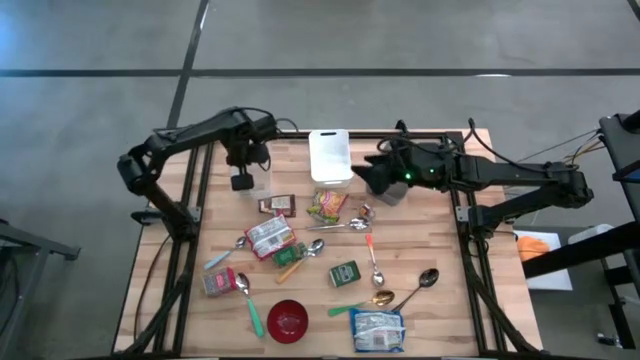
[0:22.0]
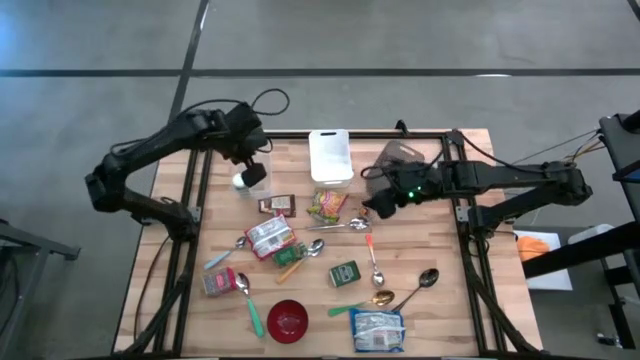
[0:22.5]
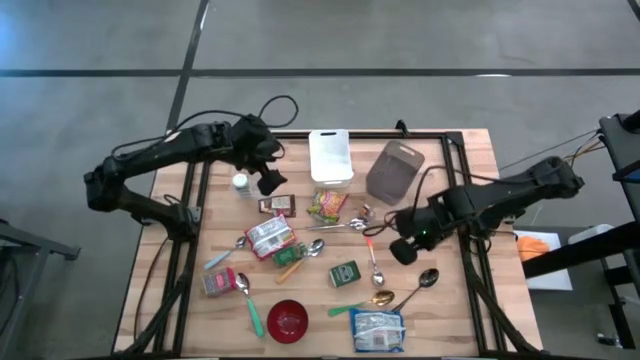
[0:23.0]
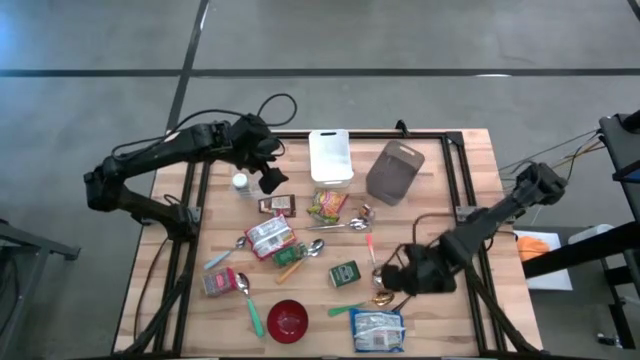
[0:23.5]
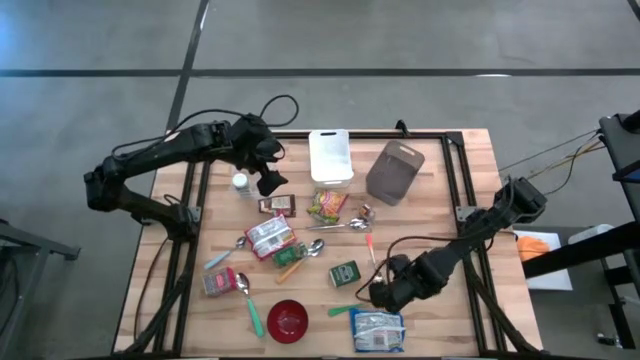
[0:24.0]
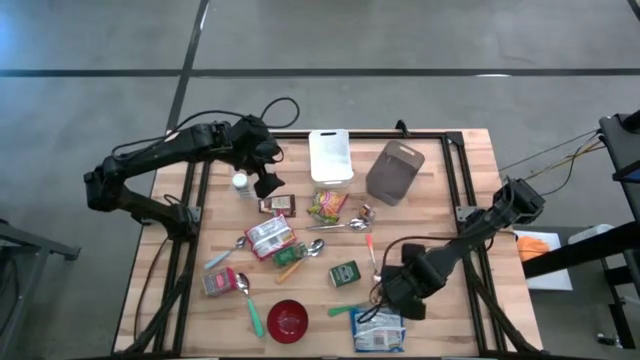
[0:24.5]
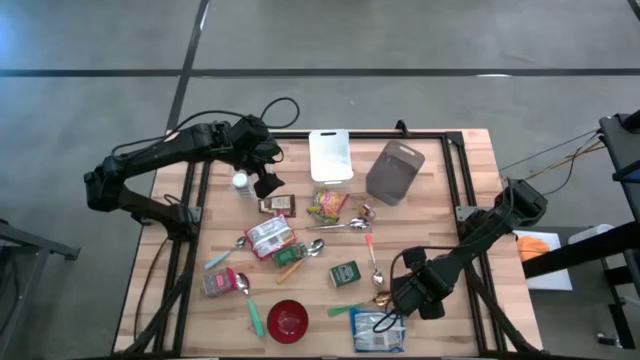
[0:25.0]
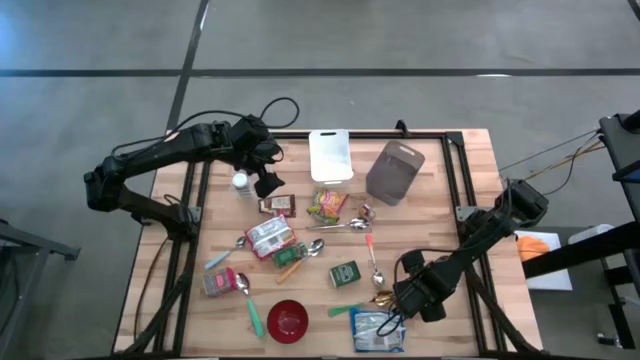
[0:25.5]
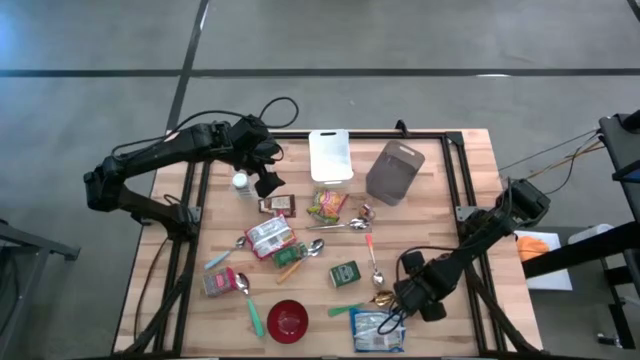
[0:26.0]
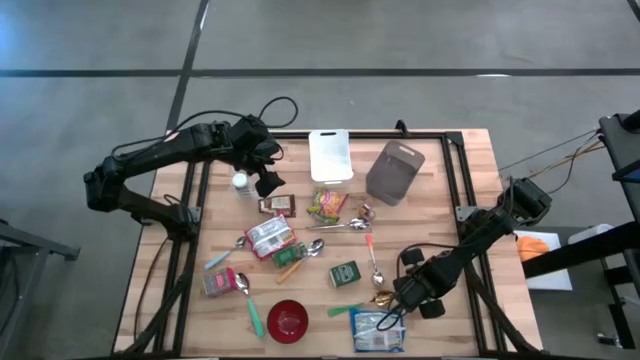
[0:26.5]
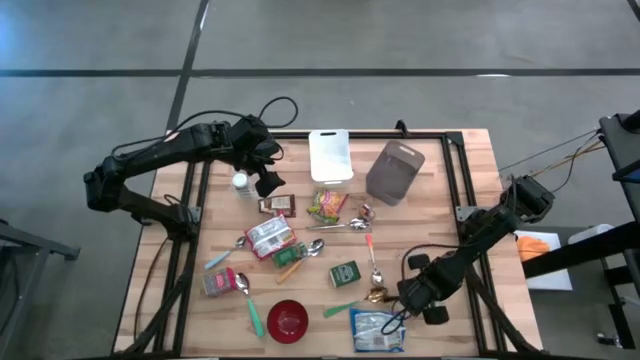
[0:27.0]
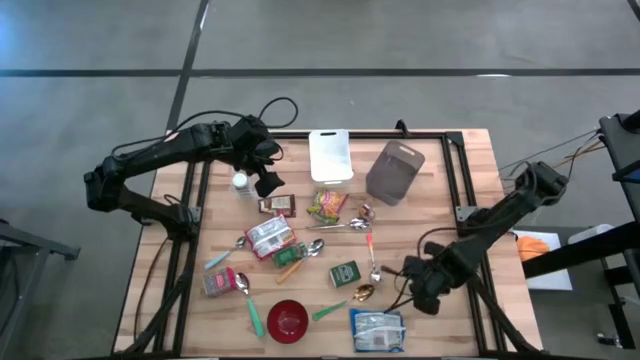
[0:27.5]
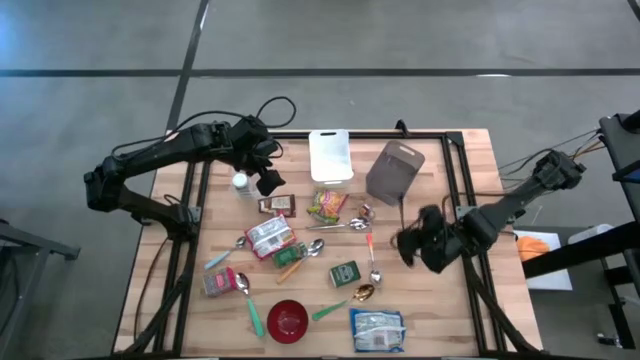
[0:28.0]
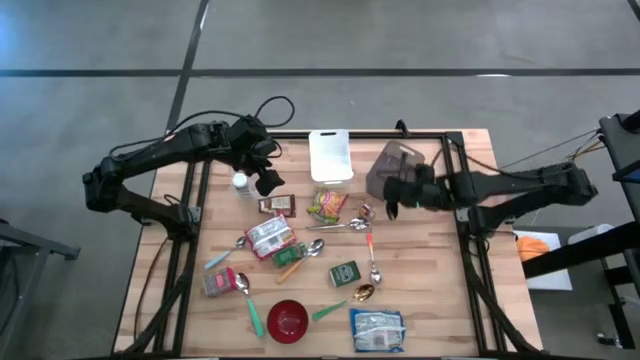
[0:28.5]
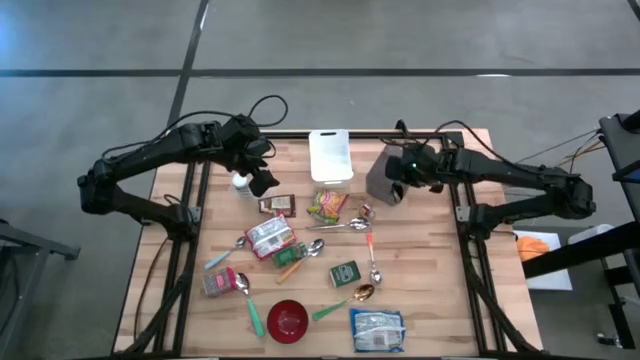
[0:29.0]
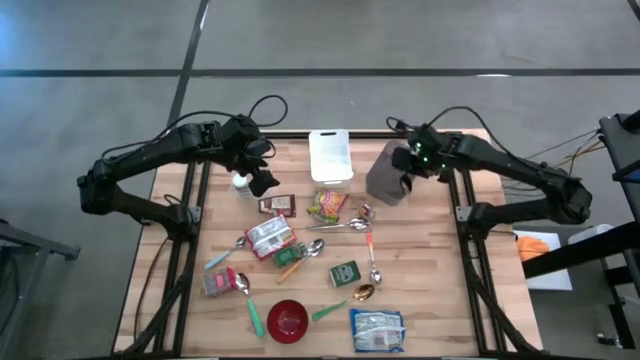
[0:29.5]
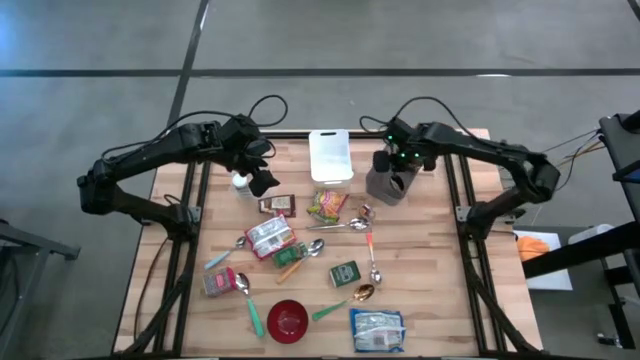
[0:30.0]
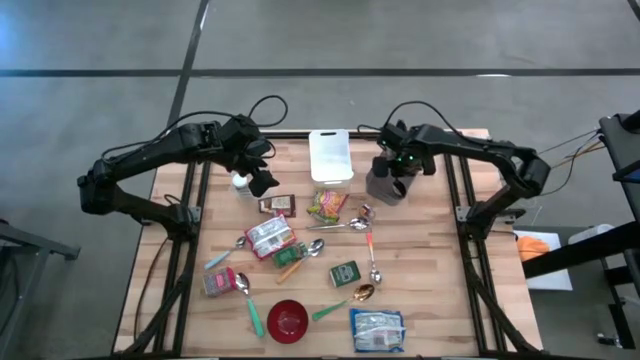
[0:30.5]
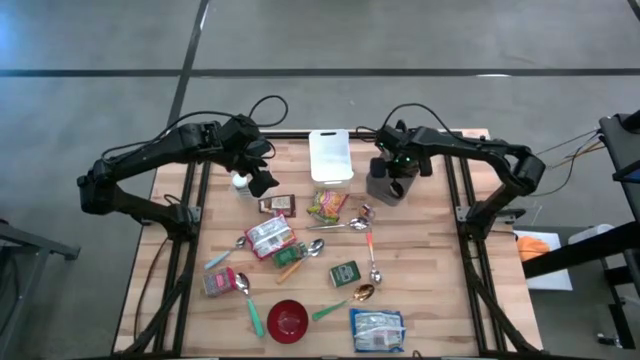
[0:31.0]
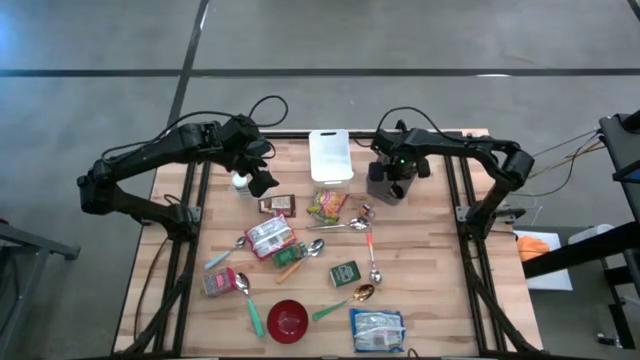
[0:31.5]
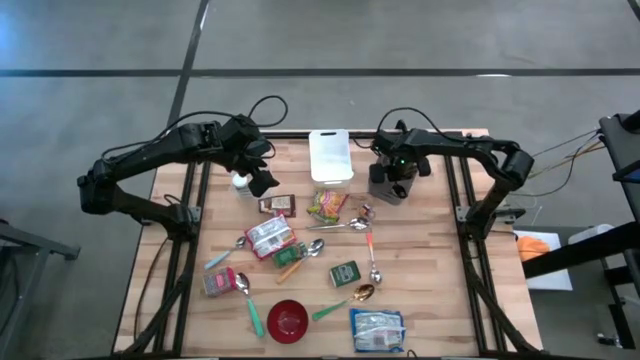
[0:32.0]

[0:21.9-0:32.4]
Put the black spoon into the black bin

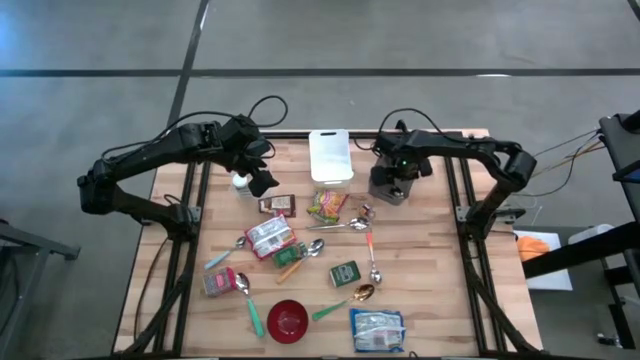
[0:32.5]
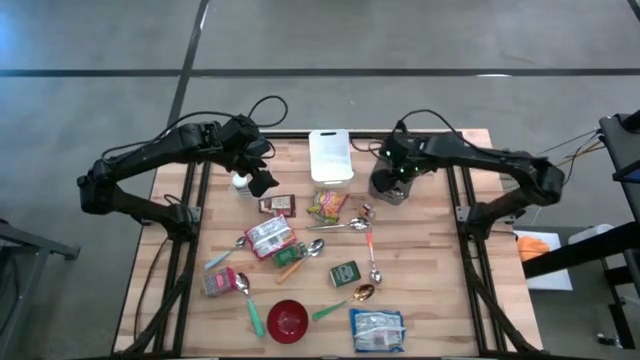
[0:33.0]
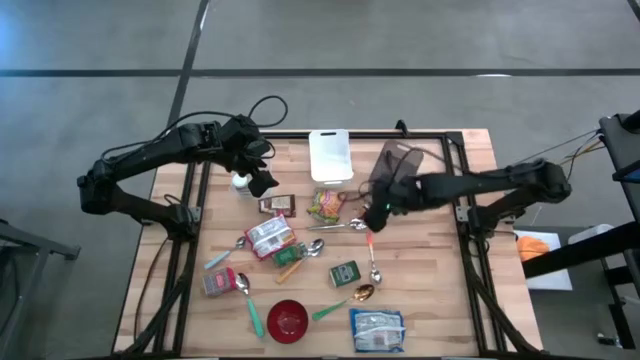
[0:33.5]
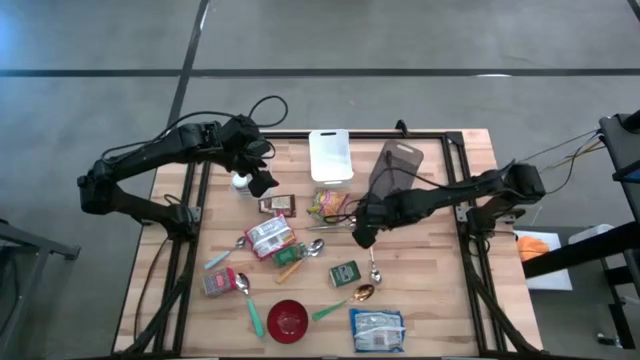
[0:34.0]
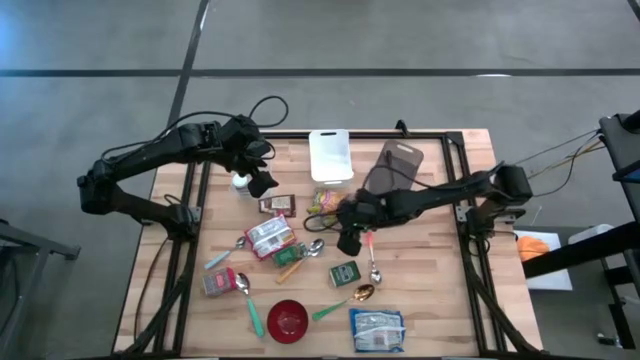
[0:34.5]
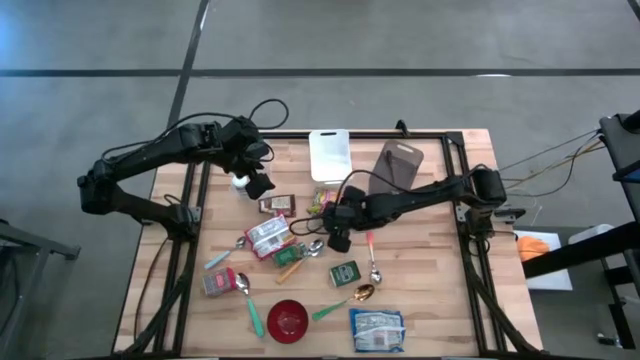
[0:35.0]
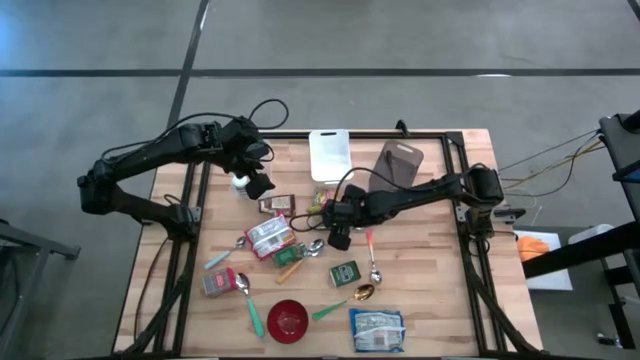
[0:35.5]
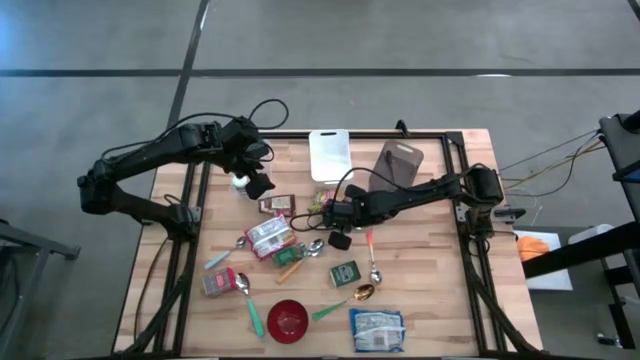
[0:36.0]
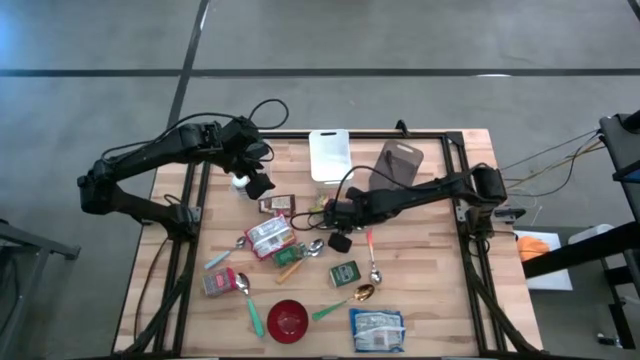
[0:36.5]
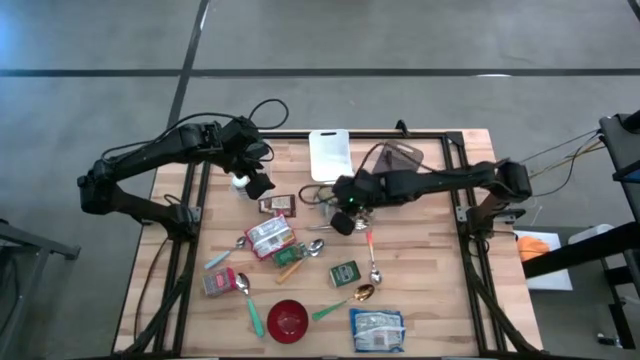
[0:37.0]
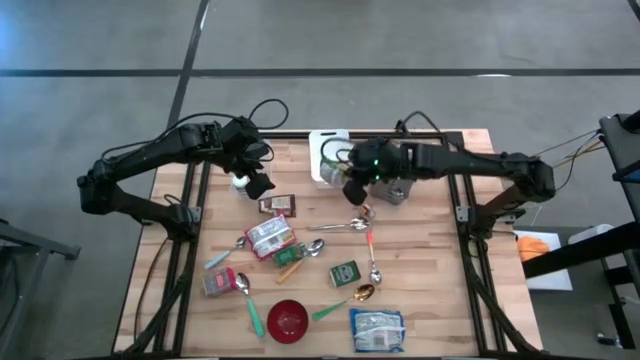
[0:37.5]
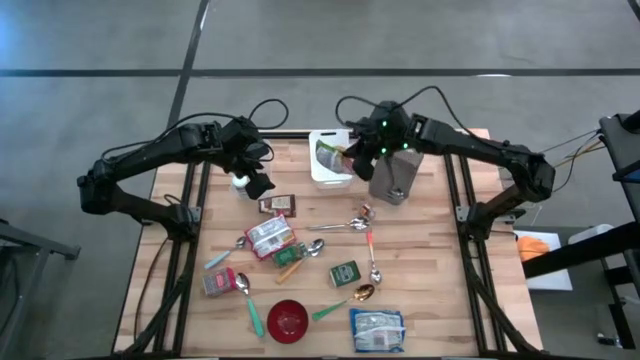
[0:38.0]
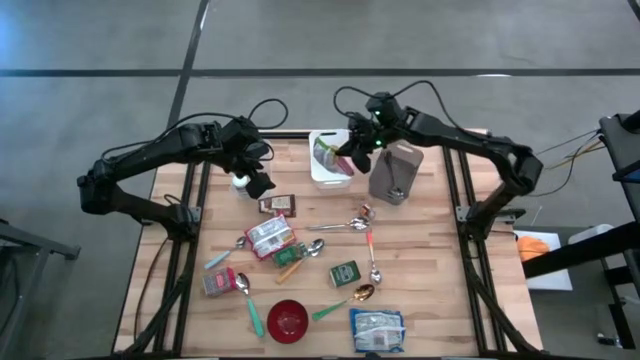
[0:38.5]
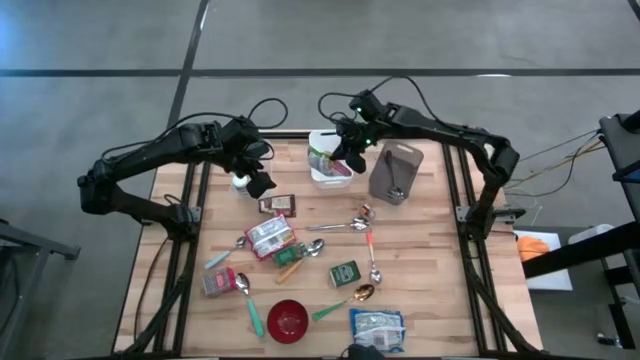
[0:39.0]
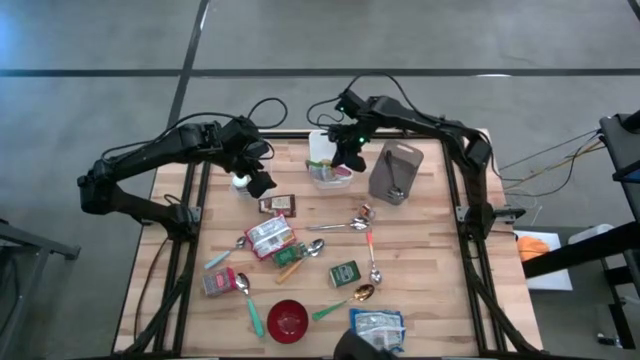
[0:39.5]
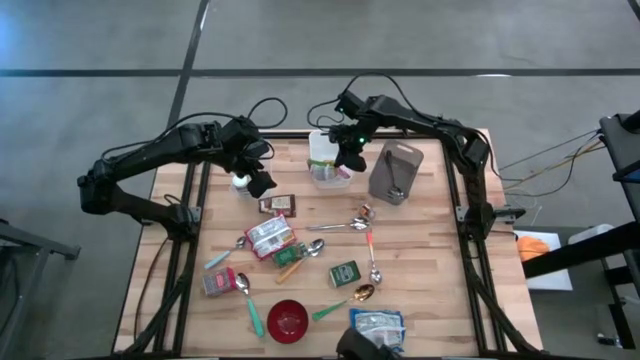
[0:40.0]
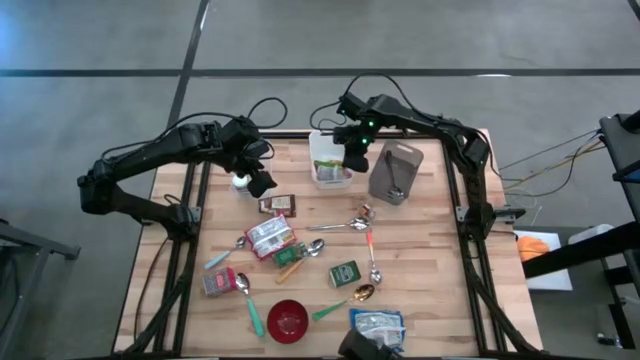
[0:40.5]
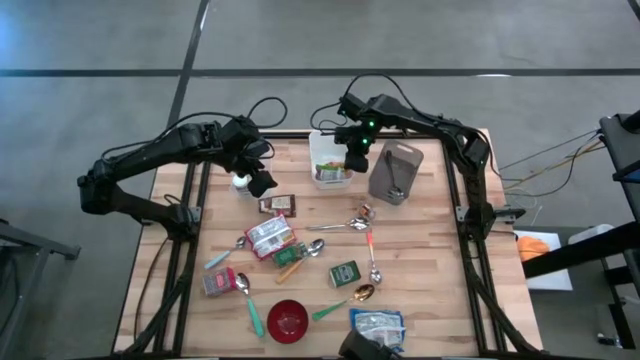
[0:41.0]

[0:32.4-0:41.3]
Put the green noodle pack into the white bin
